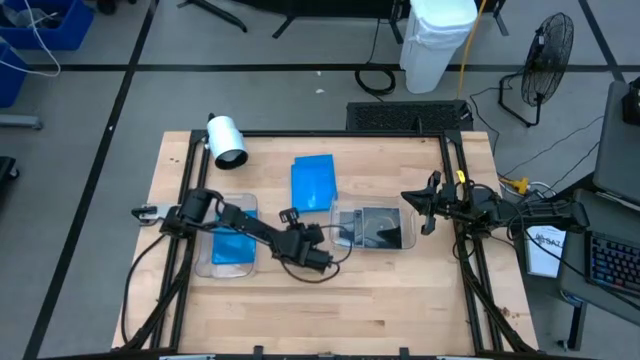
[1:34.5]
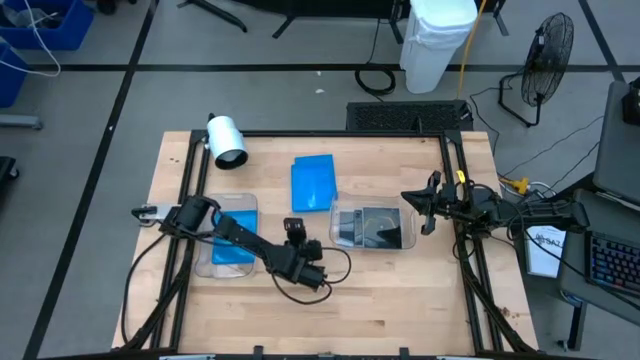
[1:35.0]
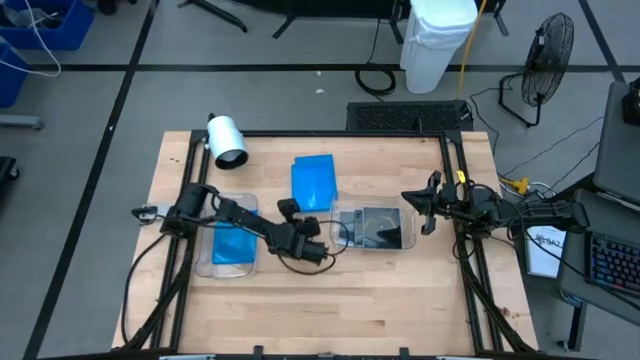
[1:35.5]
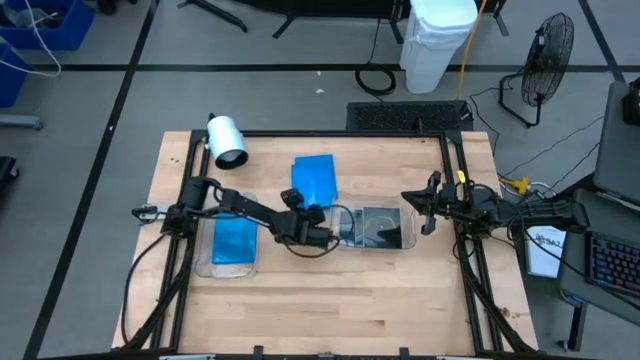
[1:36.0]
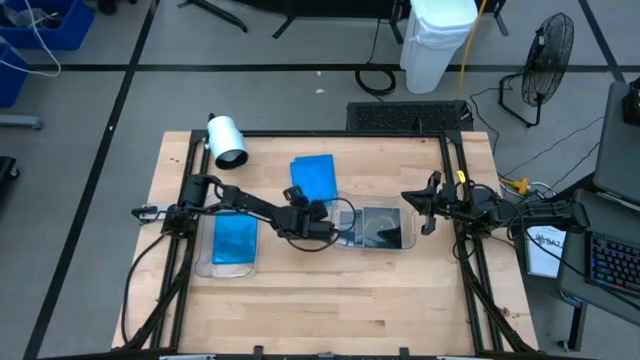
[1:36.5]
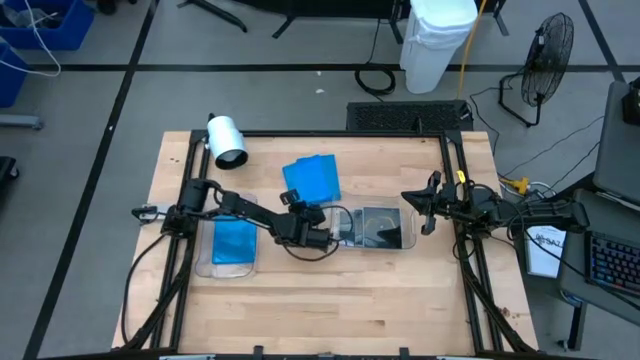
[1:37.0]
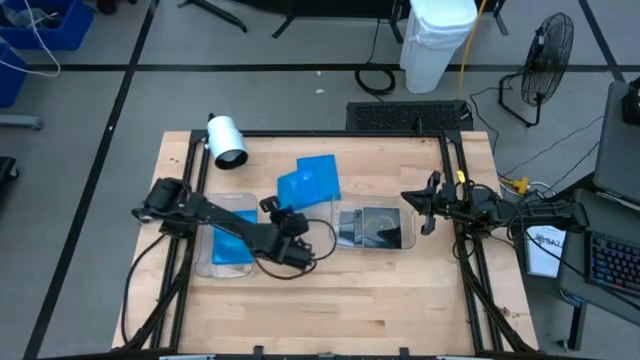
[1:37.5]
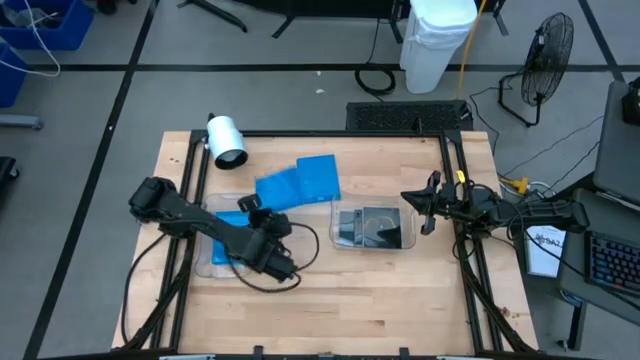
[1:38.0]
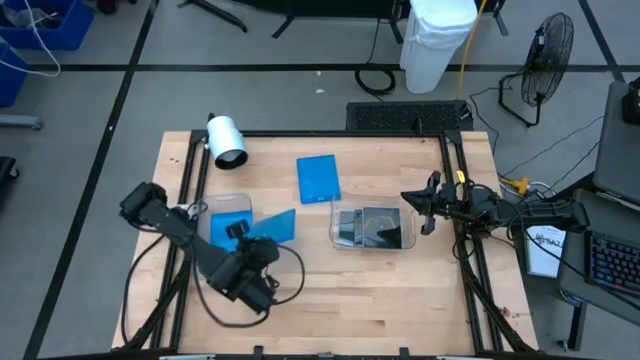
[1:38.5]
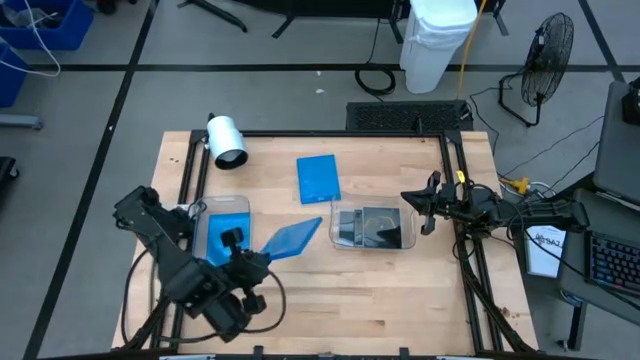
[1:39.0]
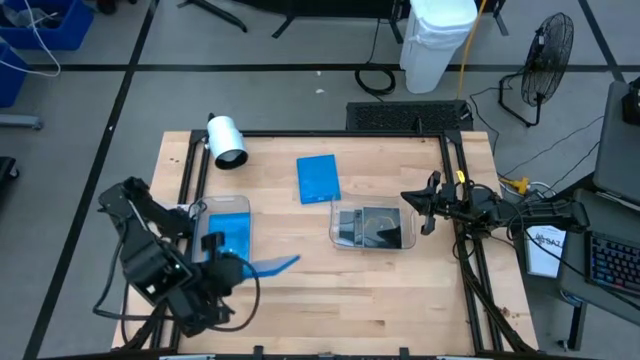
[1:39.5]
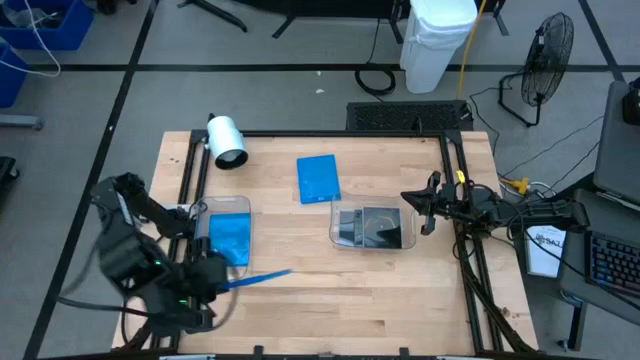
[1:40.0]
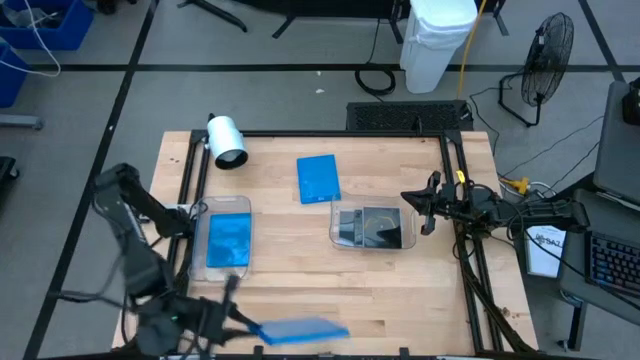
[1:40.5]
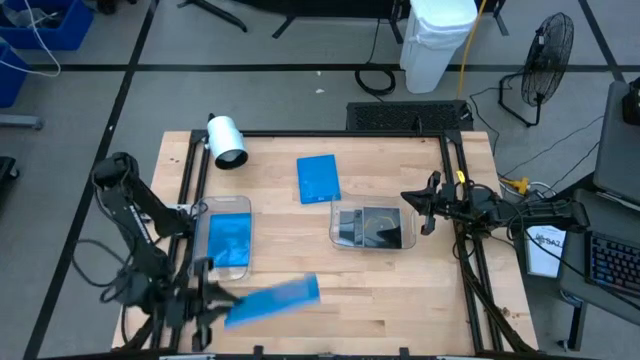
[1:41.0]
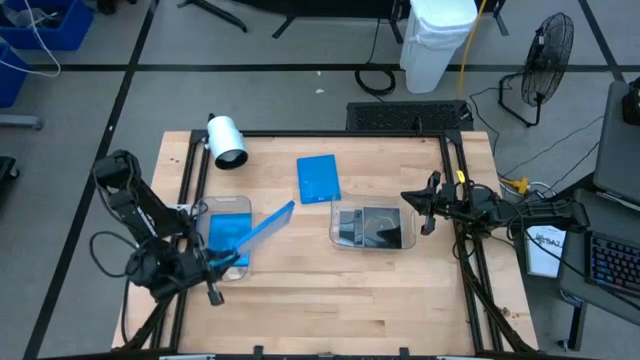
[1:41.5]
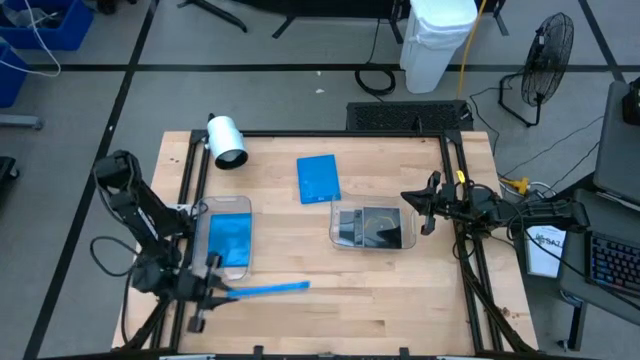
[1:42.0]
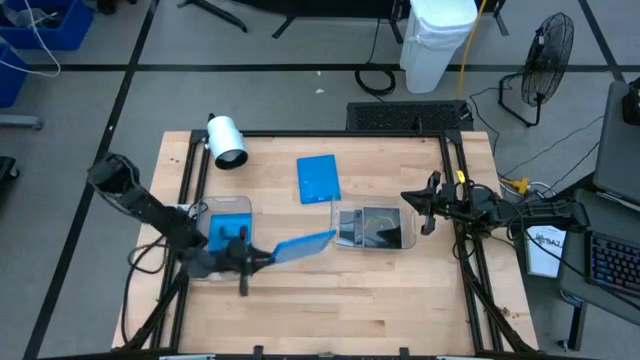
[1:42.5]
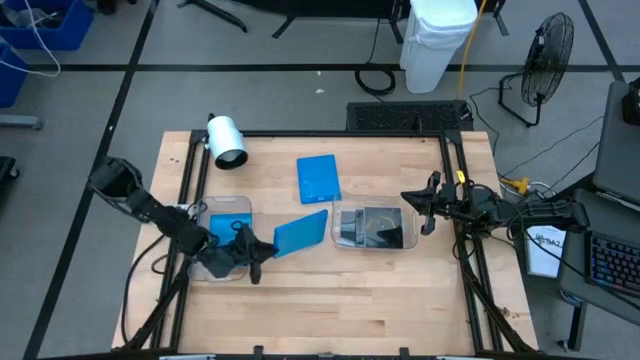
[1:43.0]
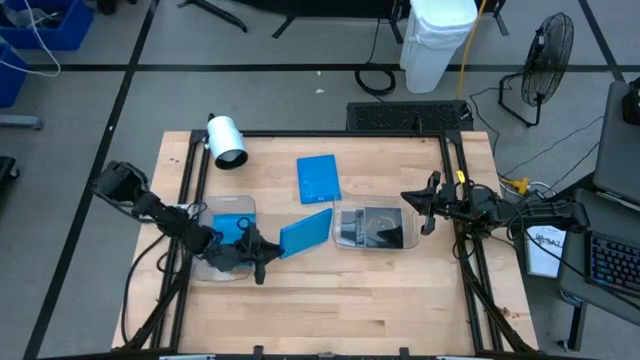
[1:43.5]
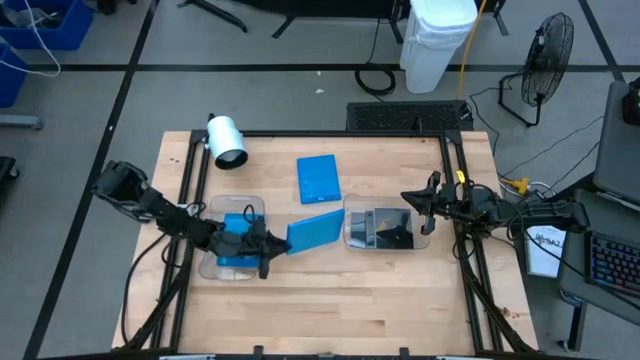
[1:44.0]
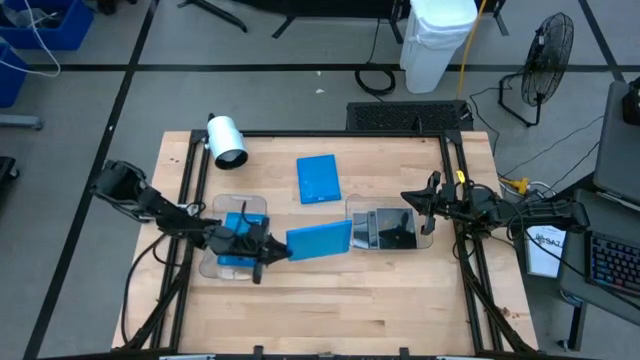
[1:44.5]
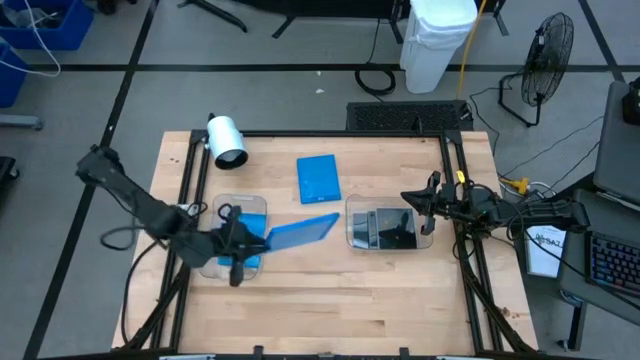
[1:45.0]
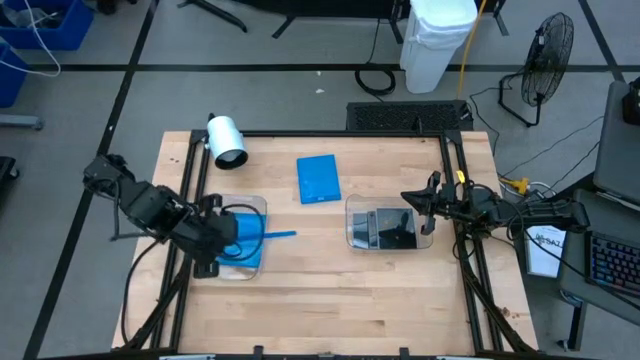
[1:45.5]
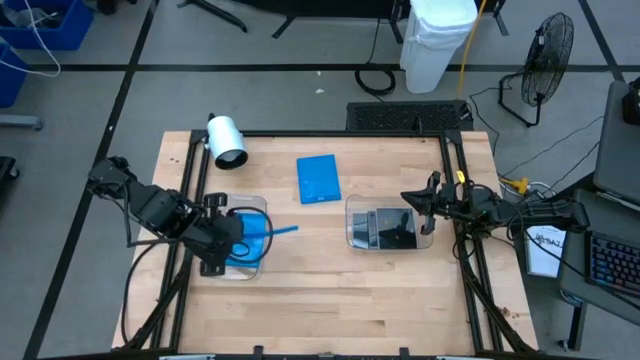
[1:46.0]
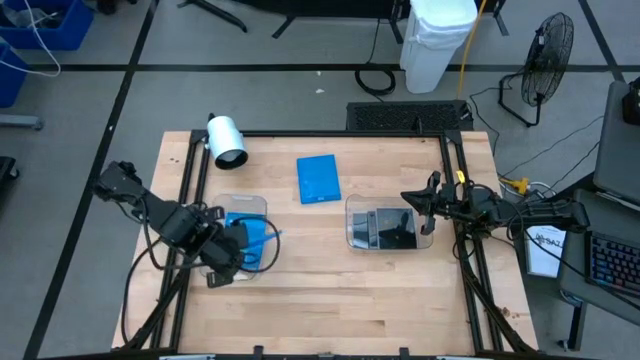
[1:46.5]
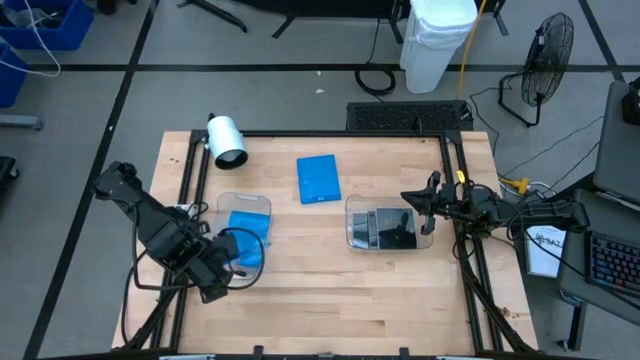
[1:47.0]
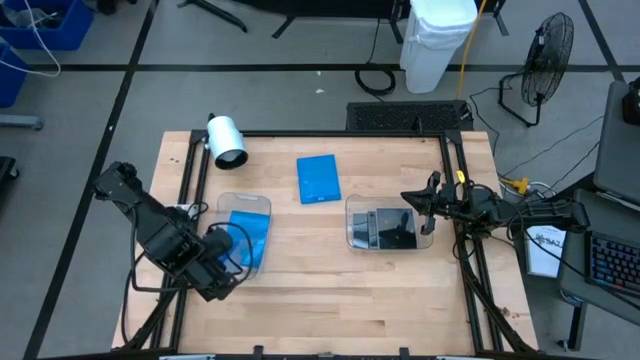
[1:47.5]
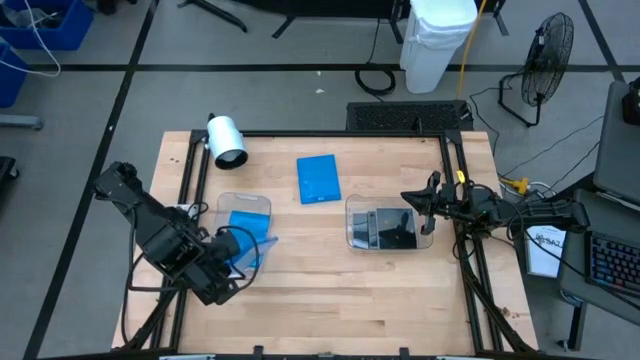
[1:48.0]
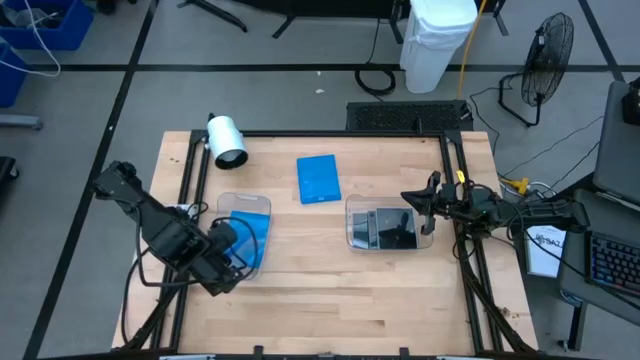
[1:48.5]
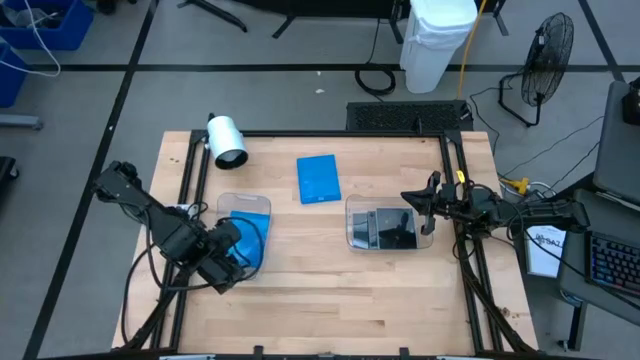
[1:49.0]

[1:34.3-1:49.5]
Task: Pick & place jewel cases by type
Put the blue CD case into the left transparent bin

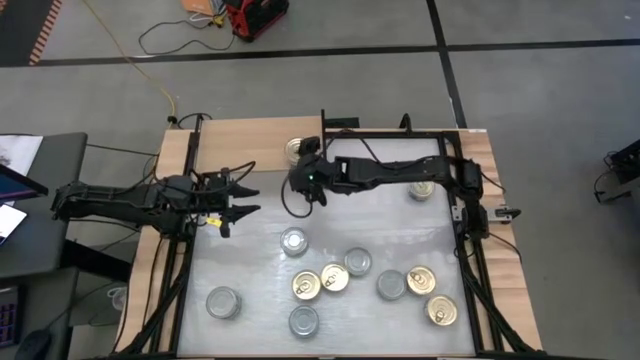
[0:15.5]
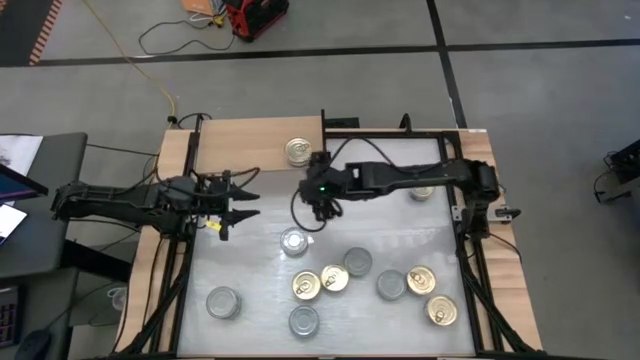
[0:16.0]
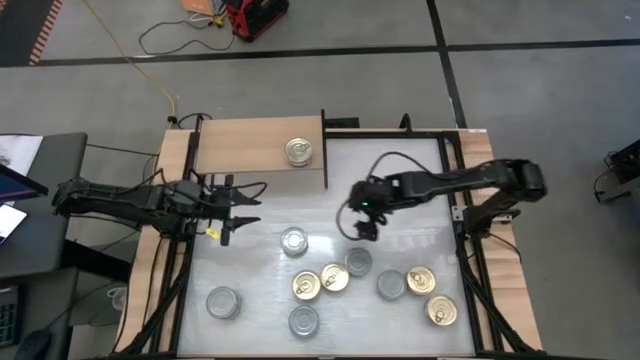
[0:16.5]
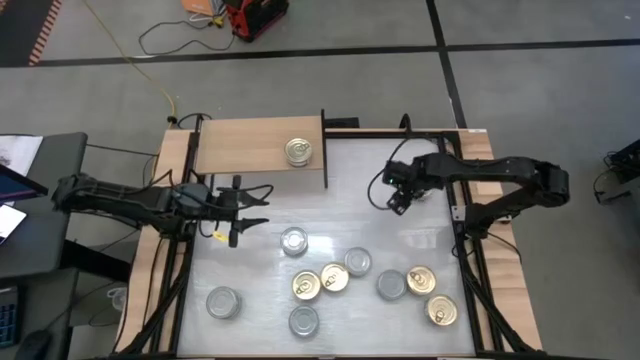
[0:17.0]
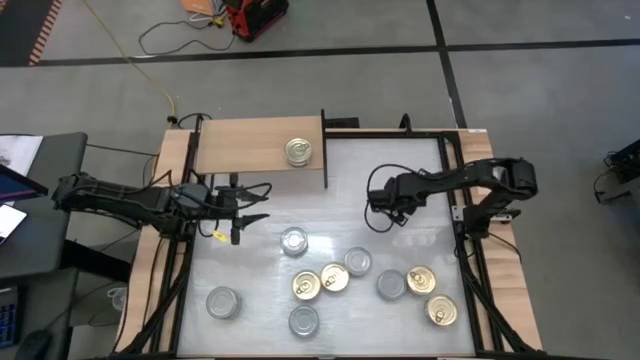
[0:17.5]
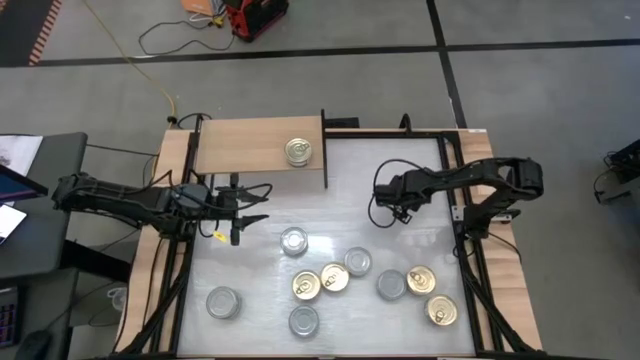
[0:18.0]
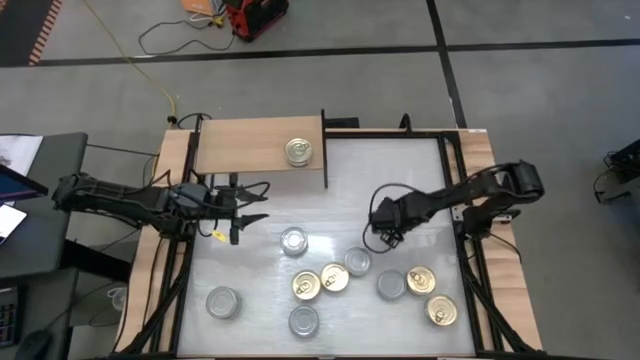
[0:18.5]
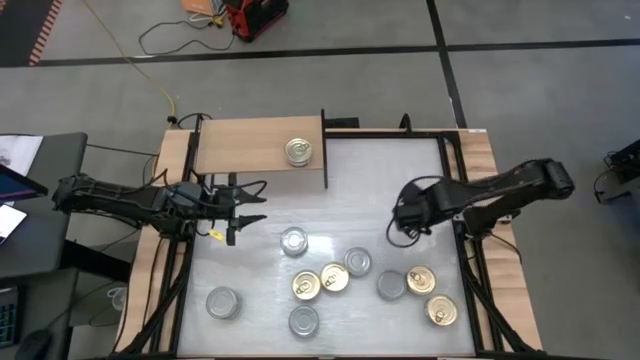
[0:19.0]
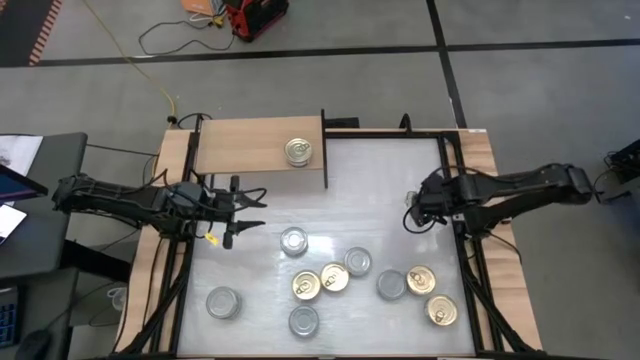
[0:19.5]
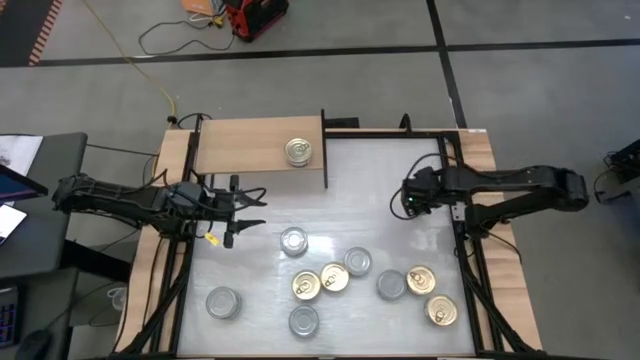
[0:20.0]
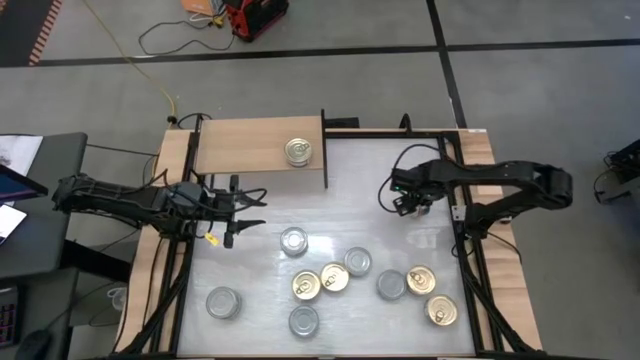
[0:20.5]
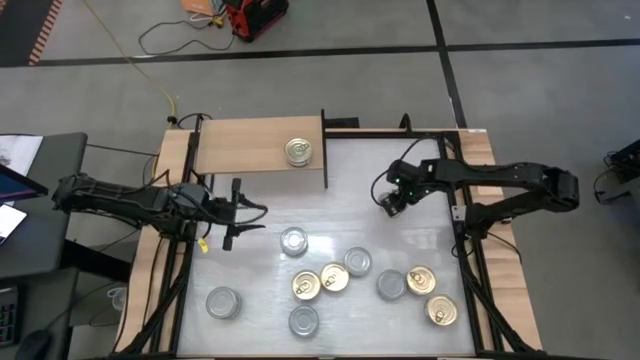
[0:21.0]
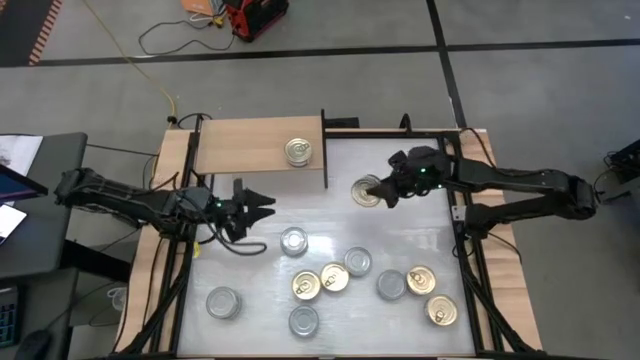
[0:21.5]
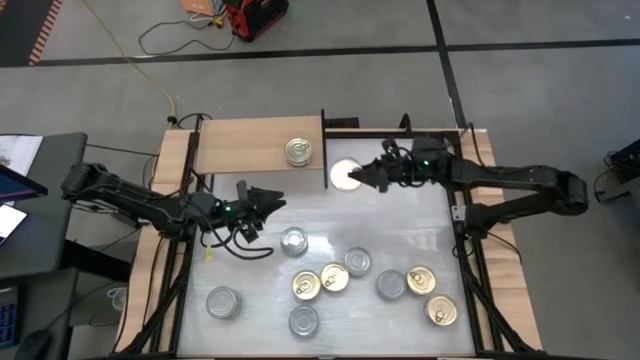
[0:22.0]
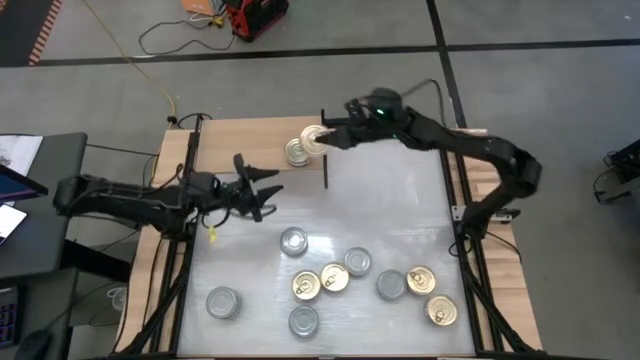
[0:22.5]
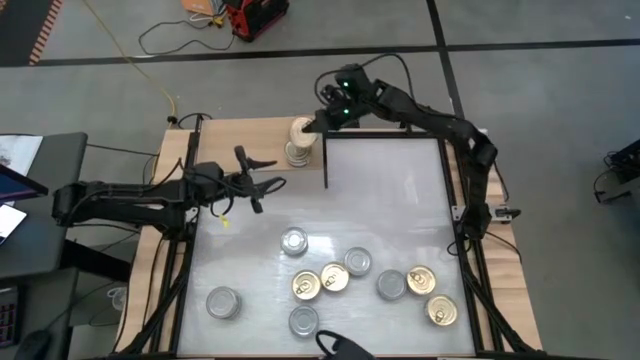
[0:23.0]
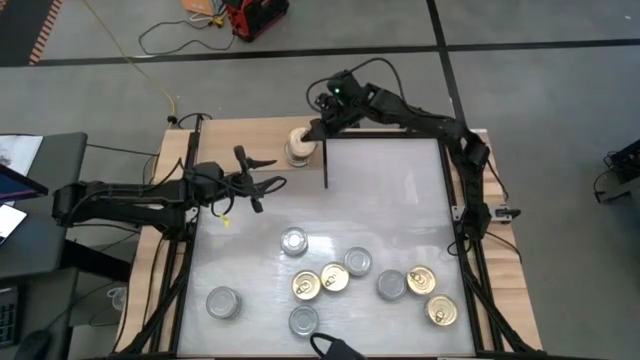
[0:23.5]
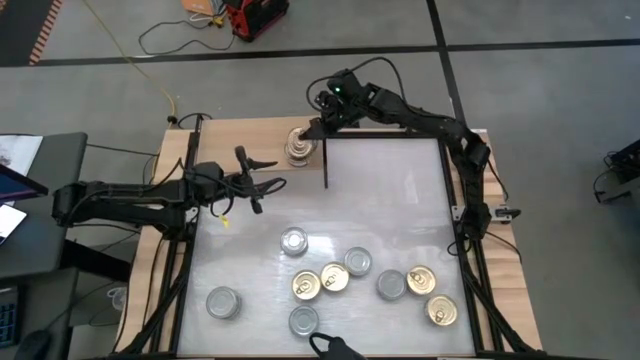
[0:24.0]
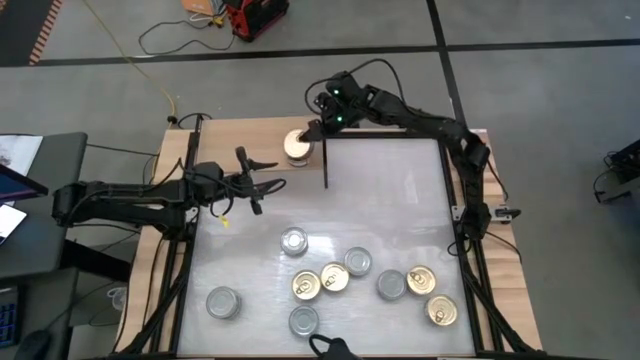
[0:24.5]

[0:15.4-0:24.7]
Task: Stack canned seafood by type on shelf
Stack the blue-pink tuna can on top of the blue-pink tuna can on the shelf
